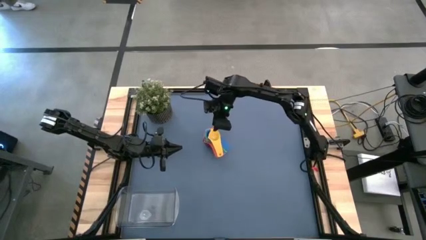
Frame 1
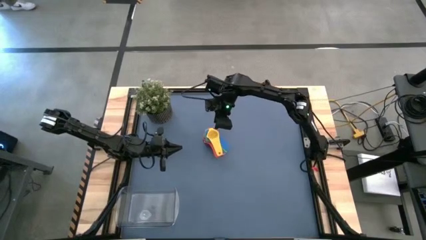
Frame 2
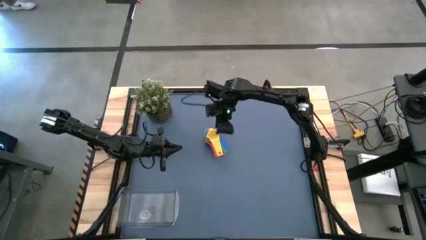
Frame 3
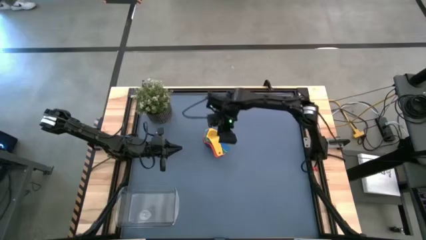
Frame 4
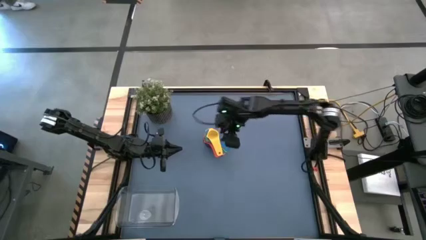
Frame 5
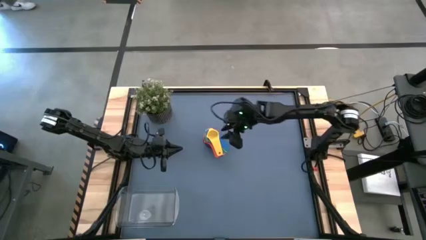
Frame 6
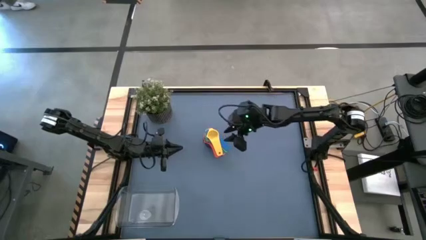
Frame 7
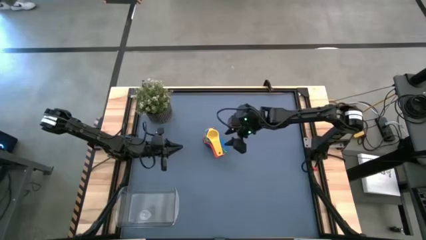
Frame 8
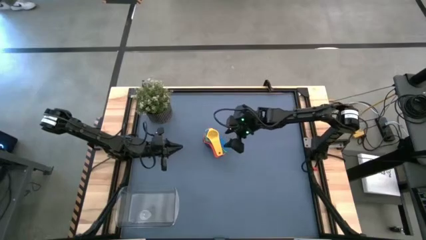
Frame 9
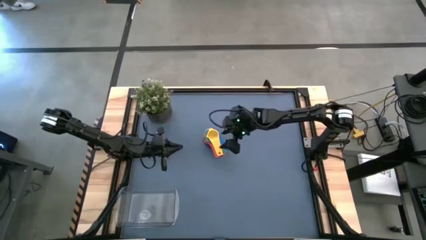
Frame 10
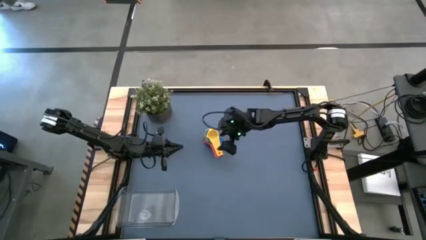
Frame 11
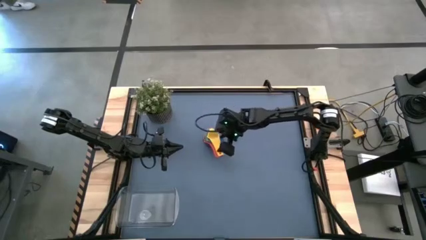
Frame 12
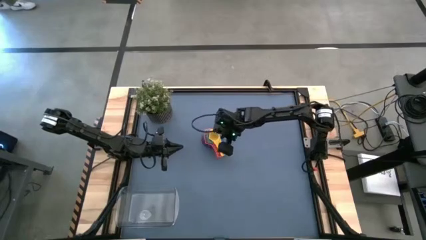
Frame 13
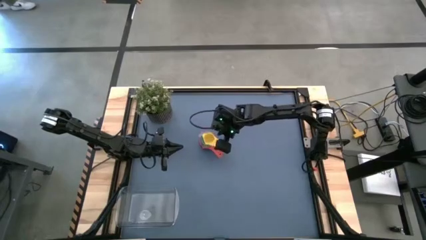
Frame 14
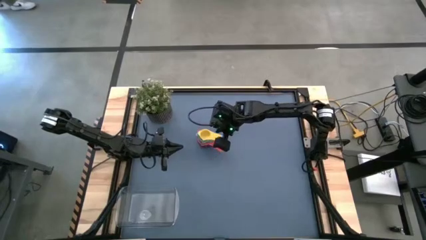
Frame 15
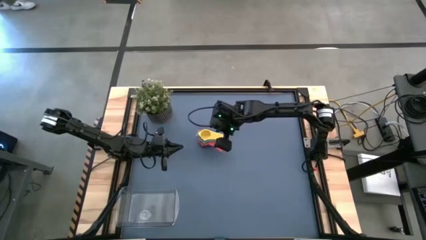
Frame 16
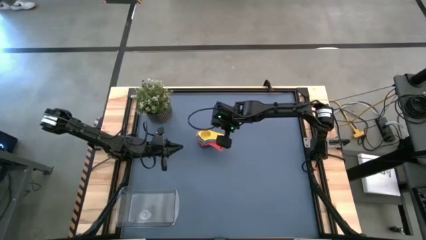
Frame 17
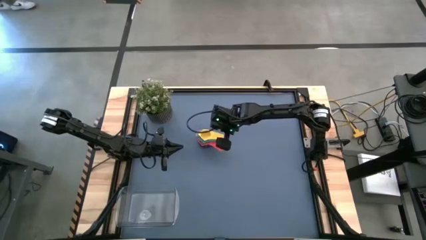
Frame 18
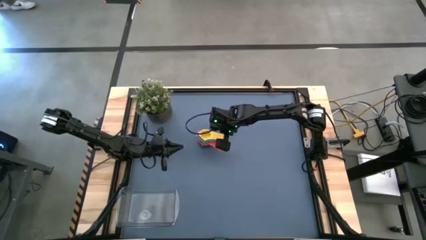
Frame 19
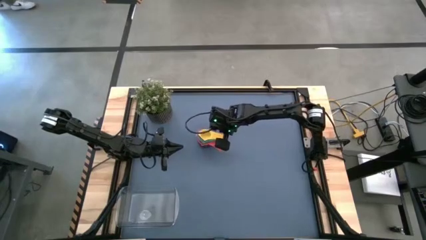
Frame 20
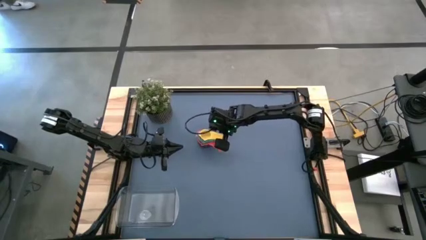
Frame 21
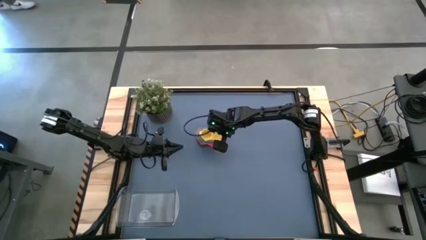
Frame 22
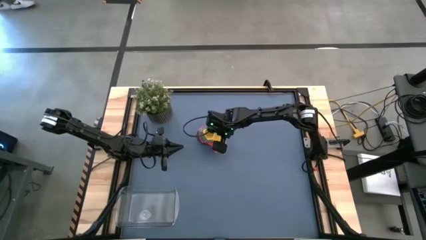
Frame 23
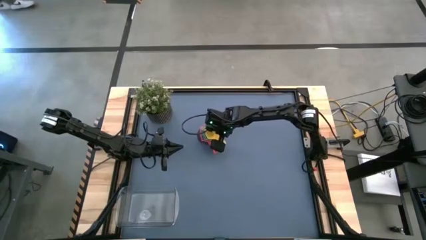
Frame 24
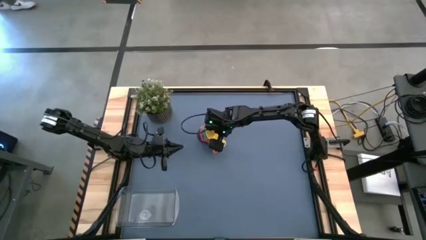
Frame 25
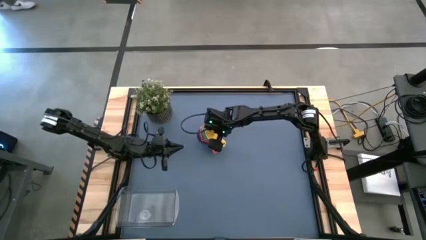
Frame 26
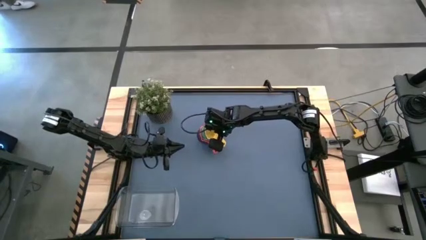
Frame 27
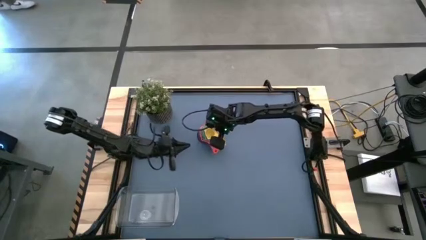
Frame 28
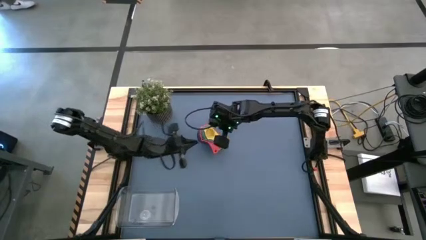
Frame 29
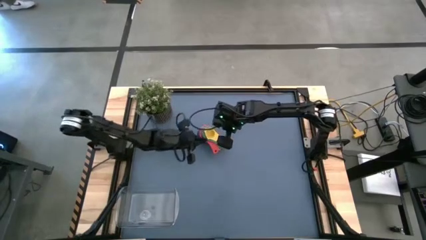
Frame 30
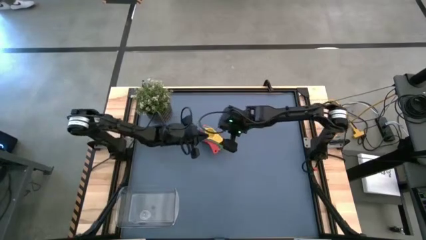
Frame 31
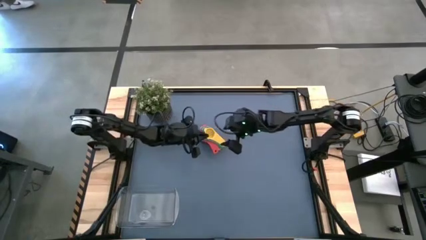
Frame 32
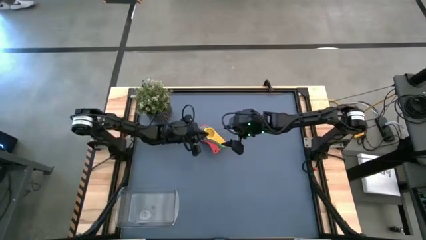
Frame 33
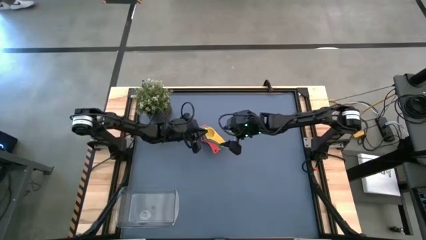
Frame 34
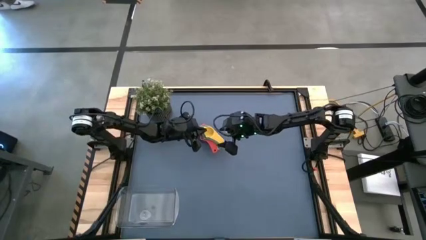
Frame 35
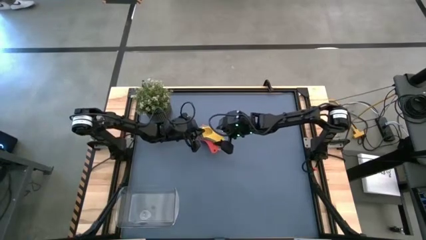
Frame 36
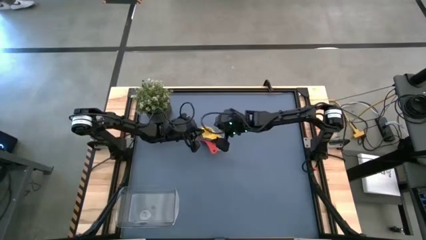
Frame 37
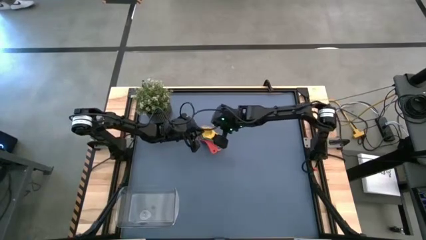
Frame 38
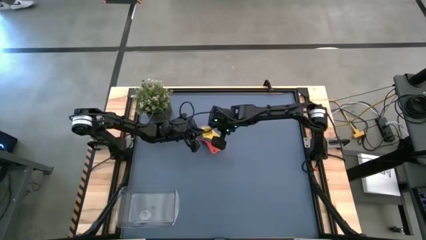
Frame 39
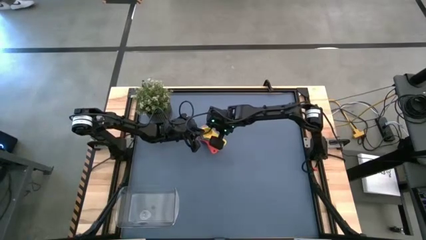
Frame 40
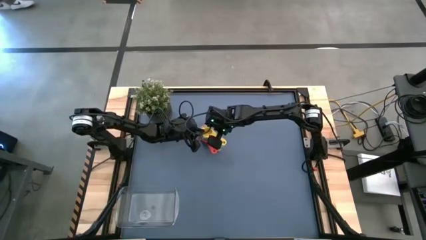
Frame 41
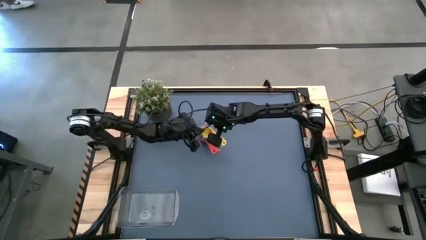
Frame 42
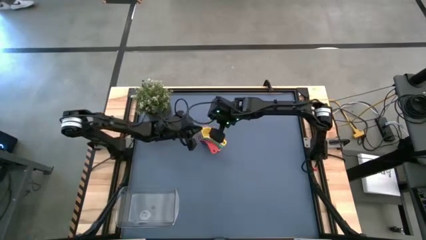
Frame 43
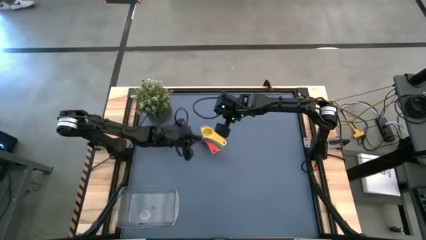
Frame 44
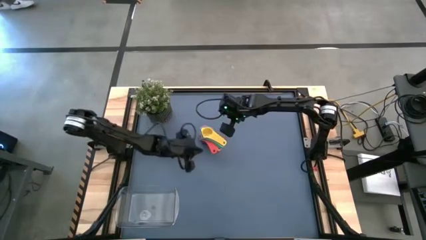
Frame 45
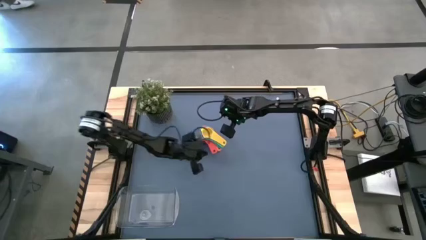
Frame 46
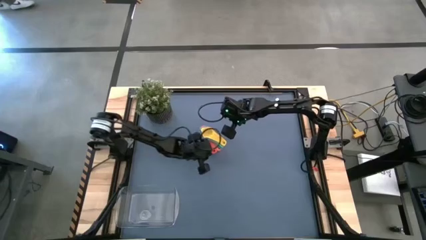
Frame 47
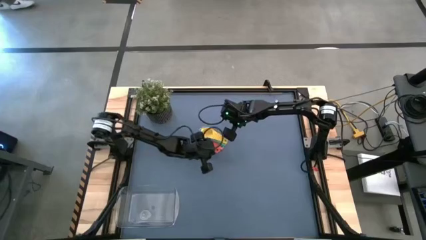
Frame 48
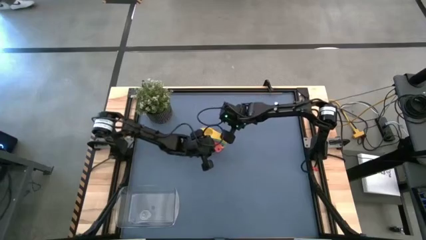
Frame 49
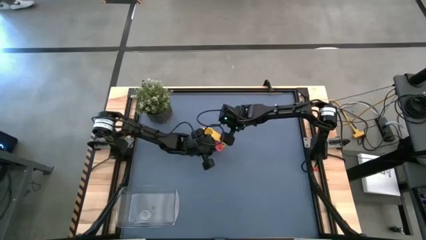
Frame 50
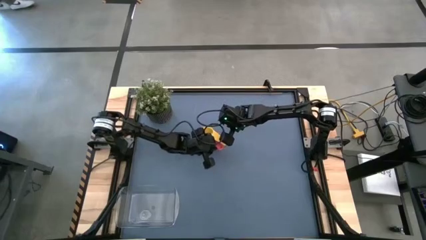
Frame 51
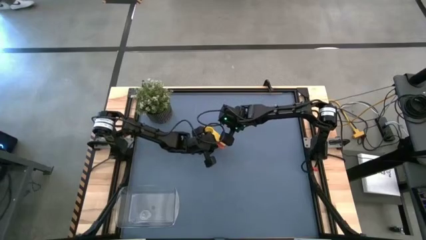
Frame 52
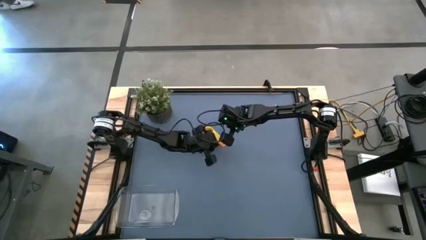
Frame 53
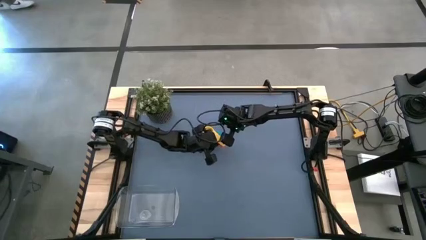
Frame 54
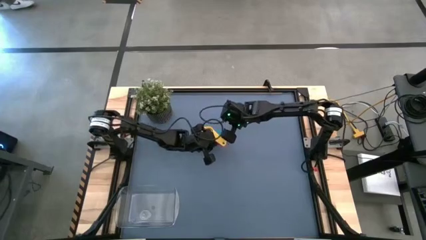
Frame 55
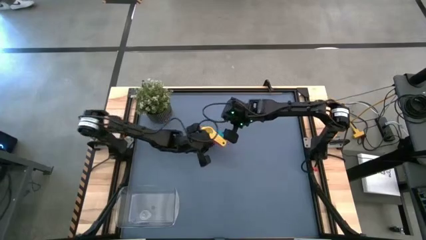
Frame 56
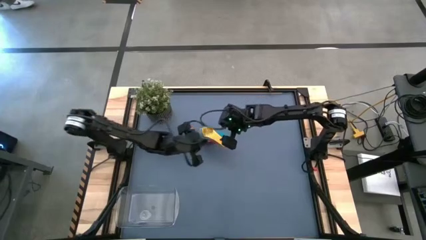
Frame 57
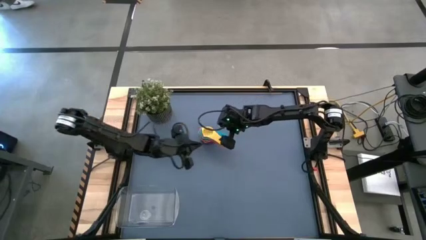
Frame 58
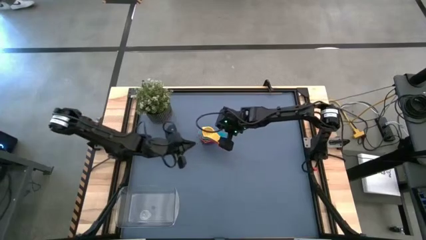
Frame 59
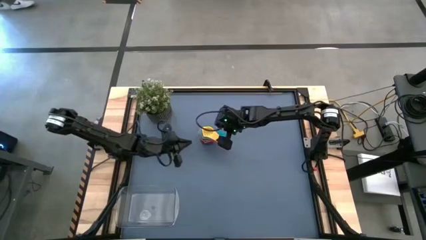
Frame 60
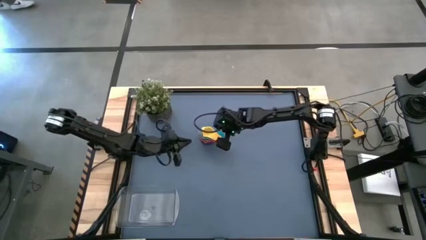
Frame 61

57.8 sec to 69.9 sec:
Task: Nest measuring cups in basket
Put the stacked measuring cups into the transparent bin
